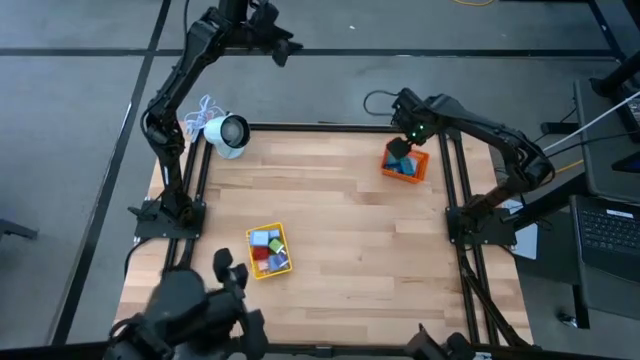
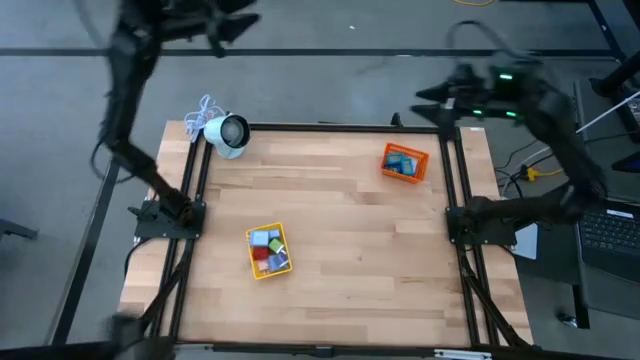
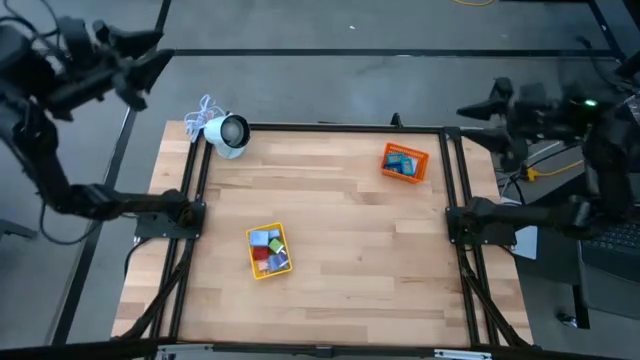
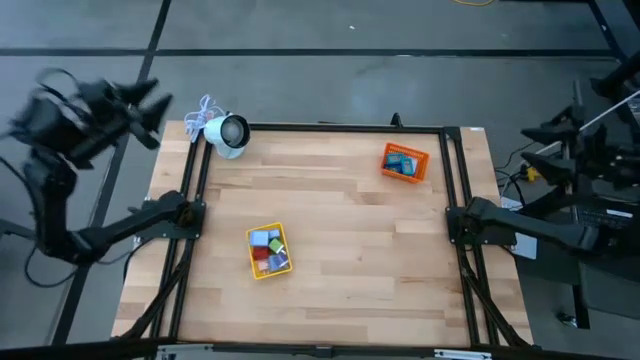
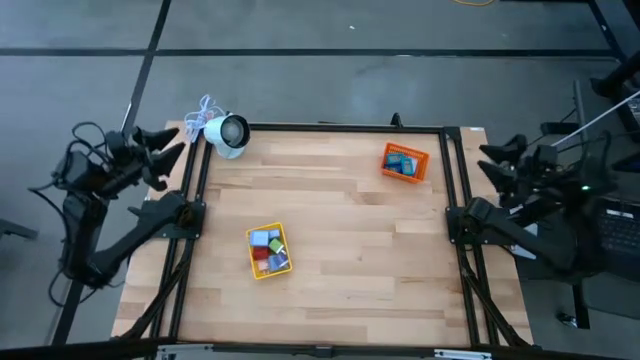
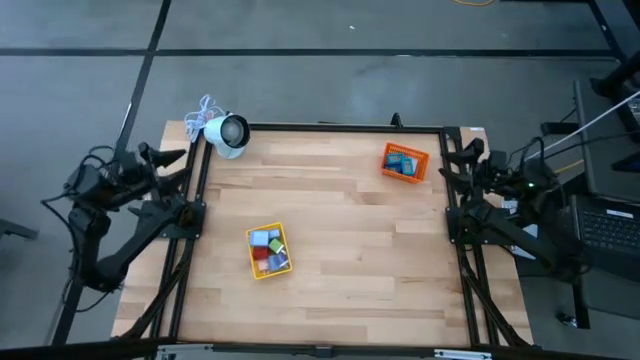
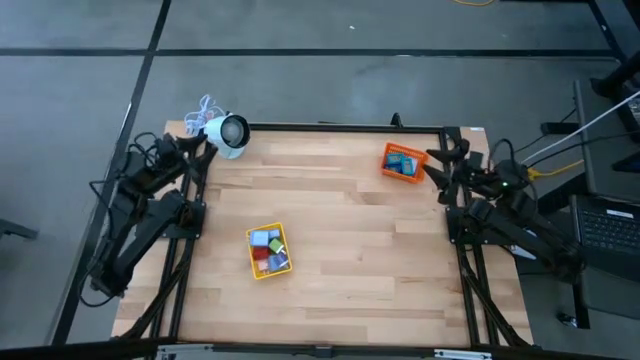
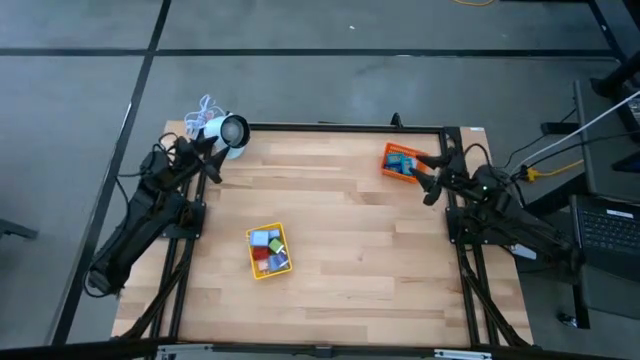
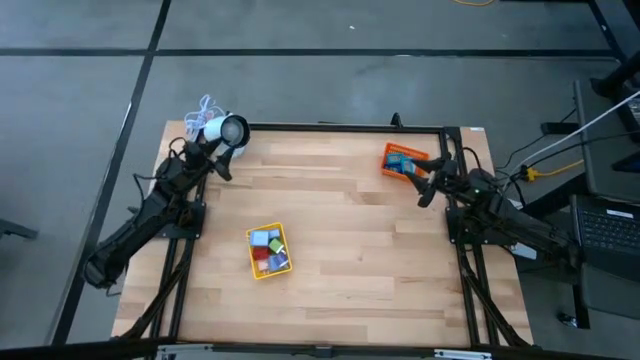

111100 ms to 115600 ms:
Task: Pick & Place Office items
Return to Home Position

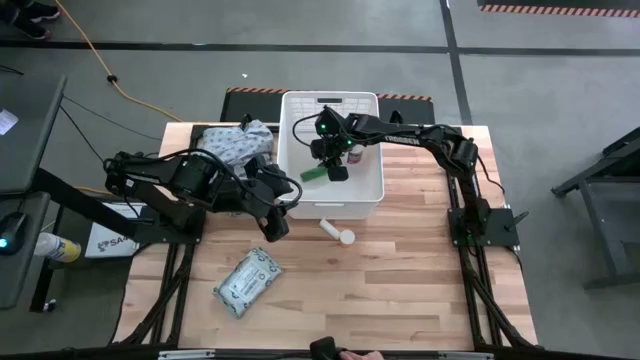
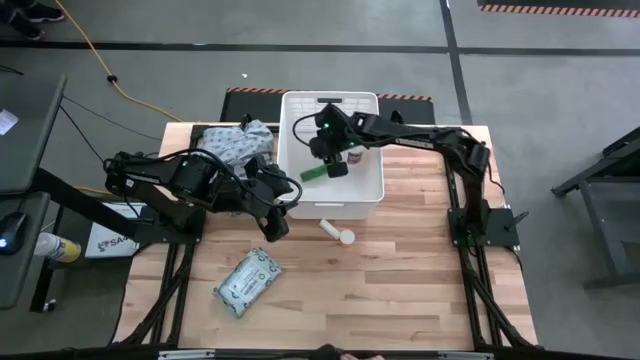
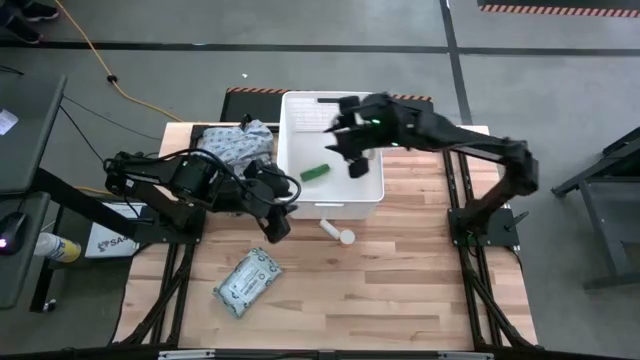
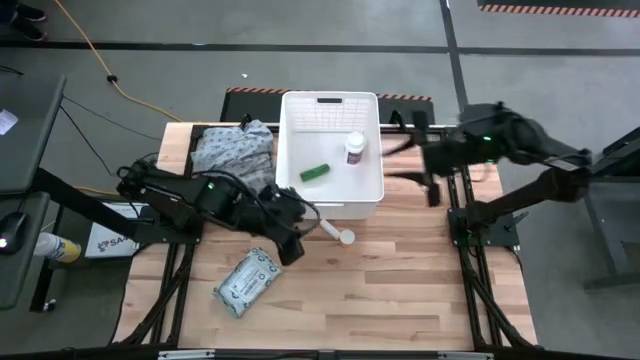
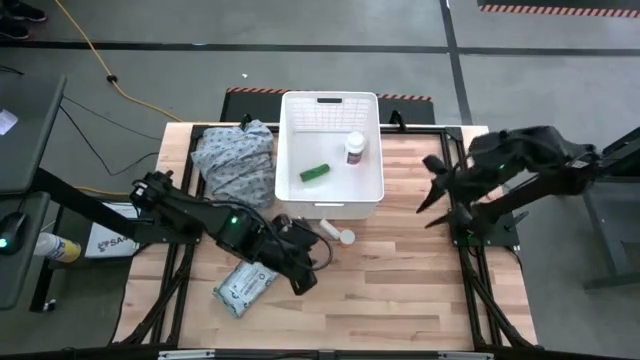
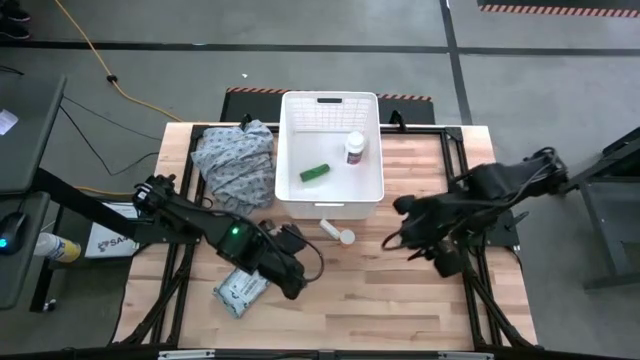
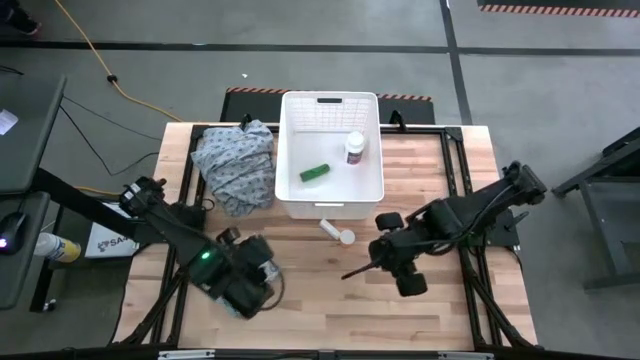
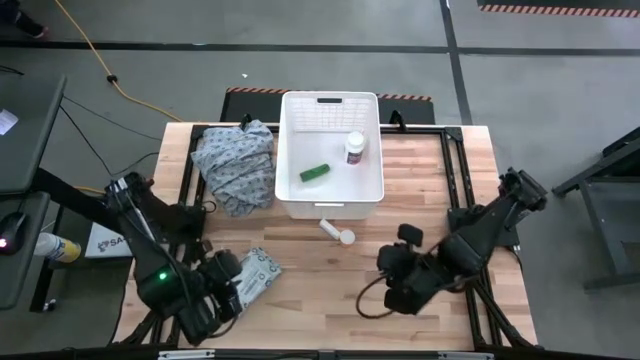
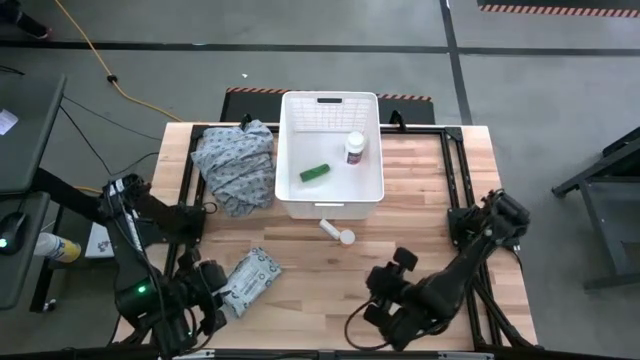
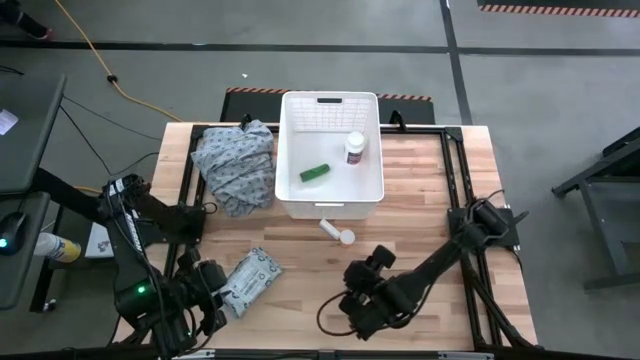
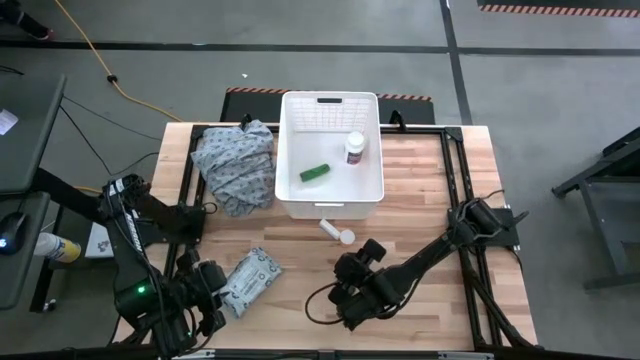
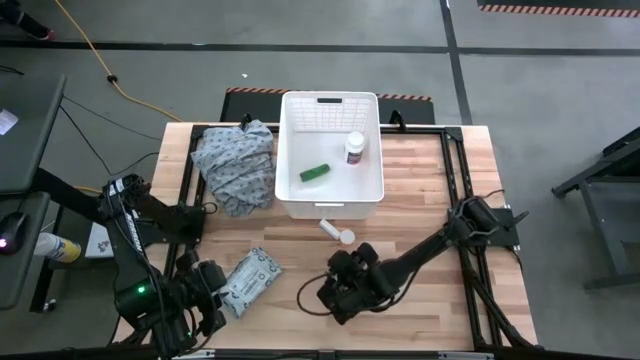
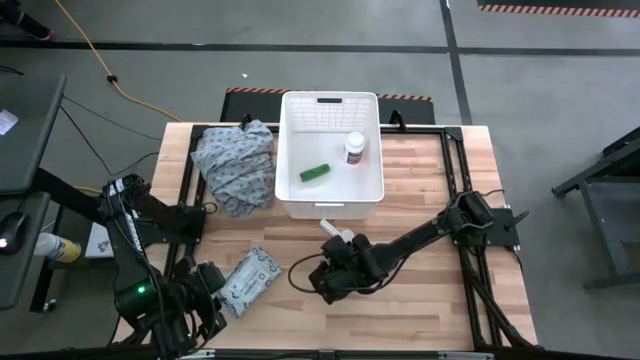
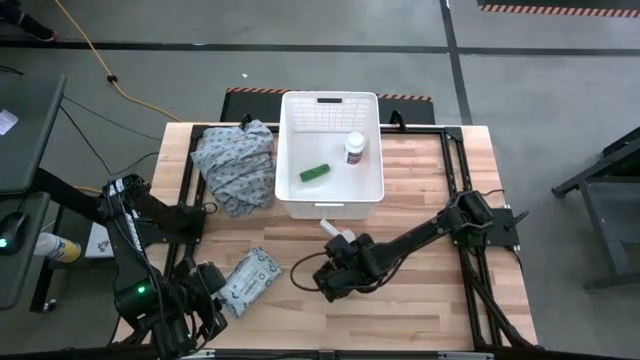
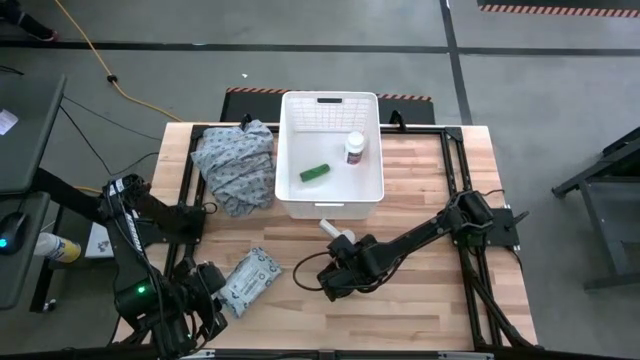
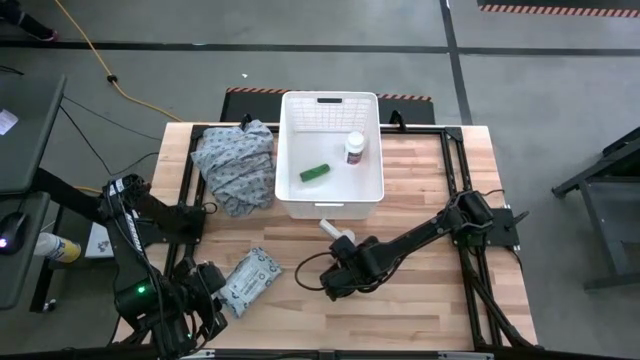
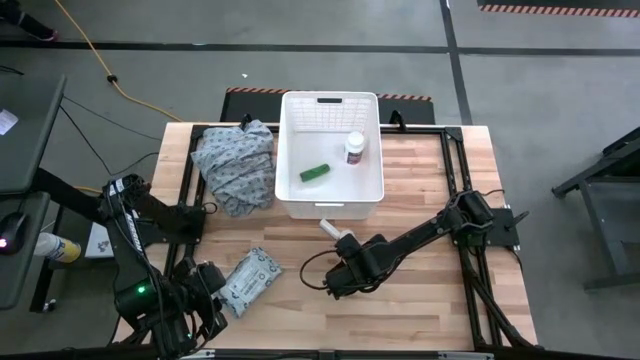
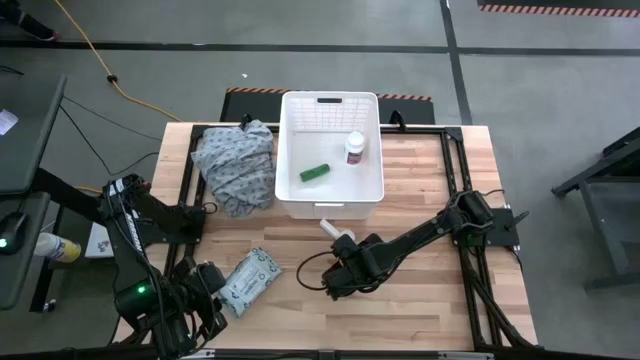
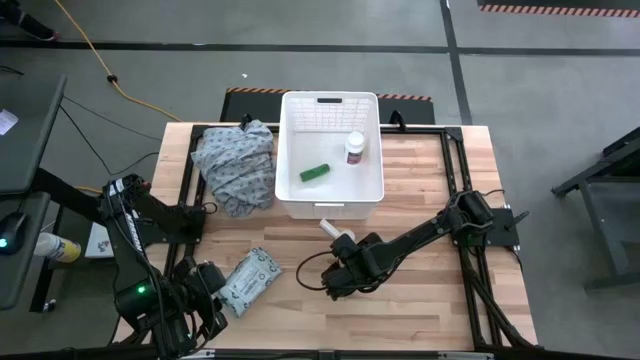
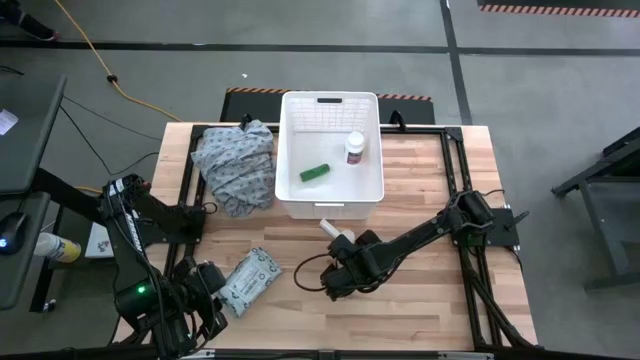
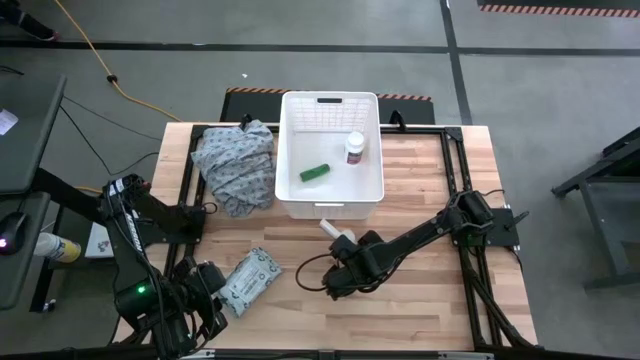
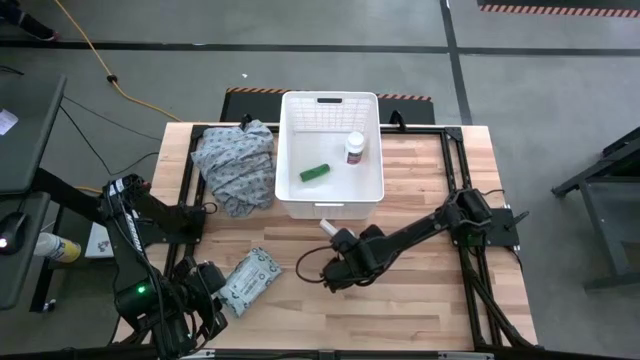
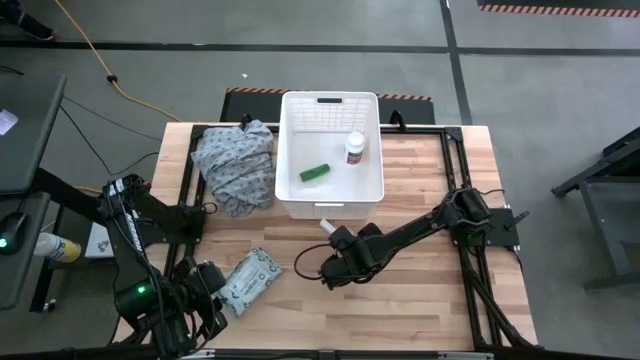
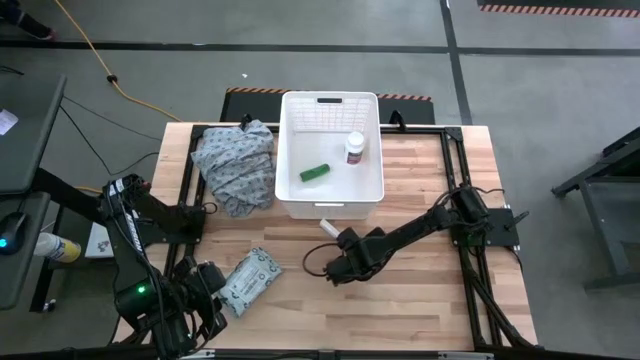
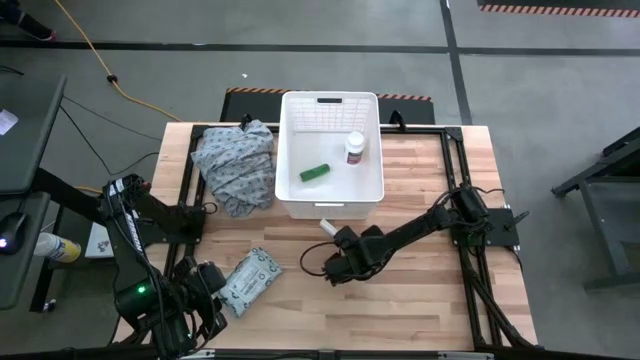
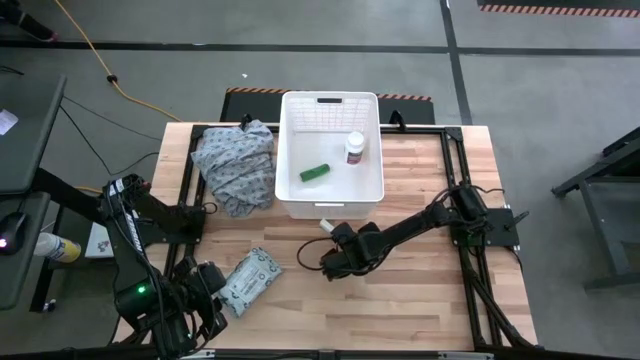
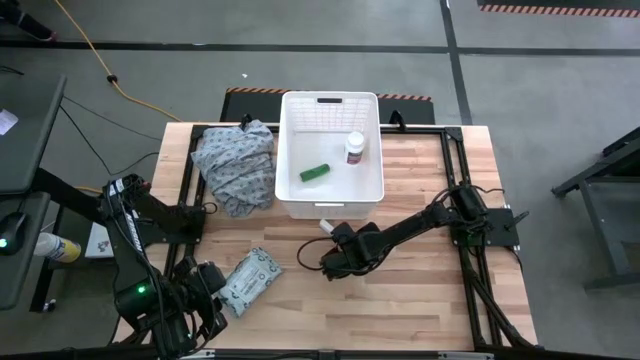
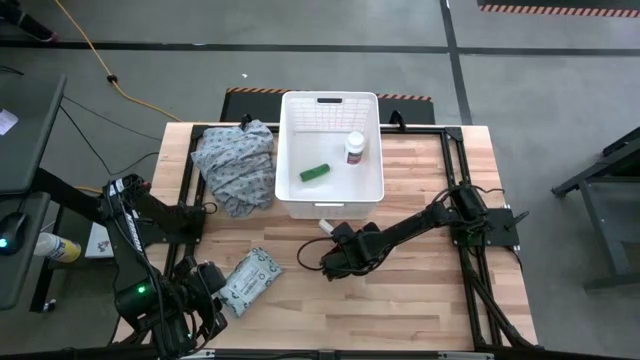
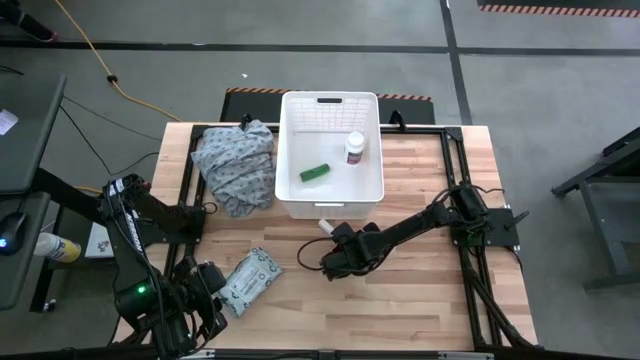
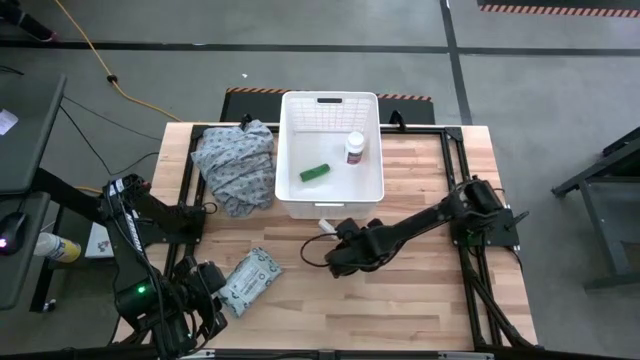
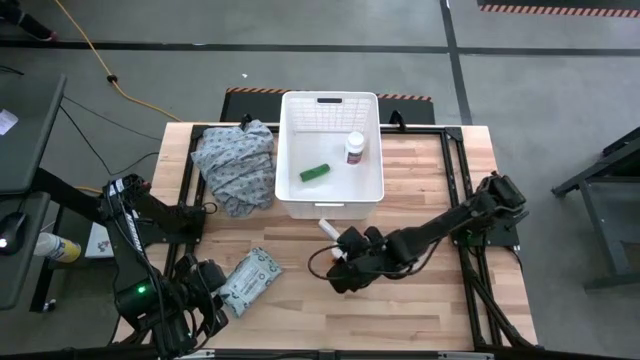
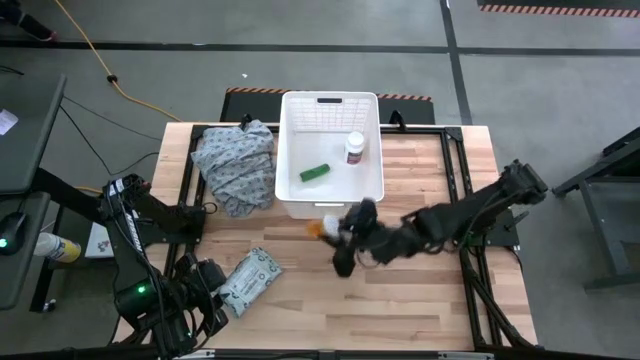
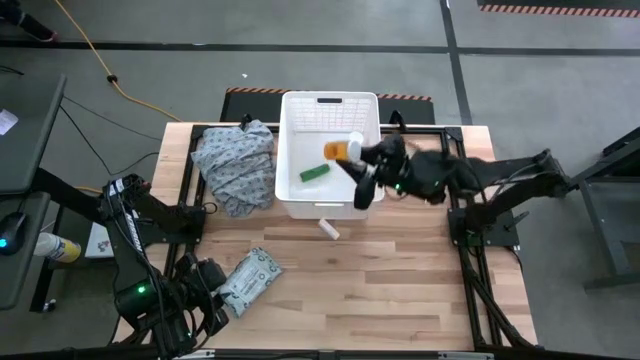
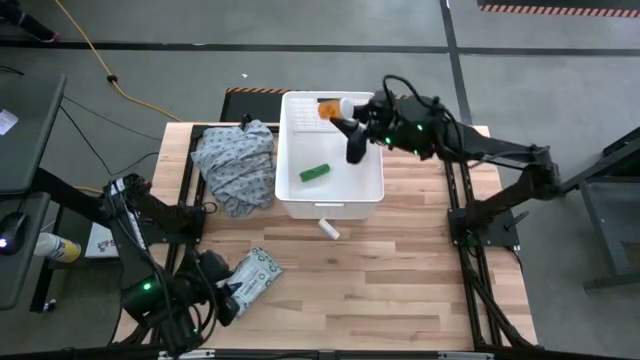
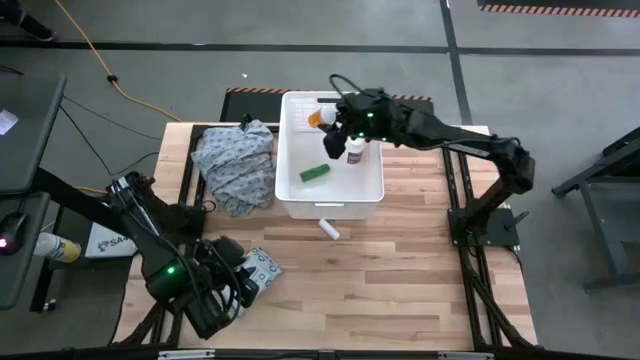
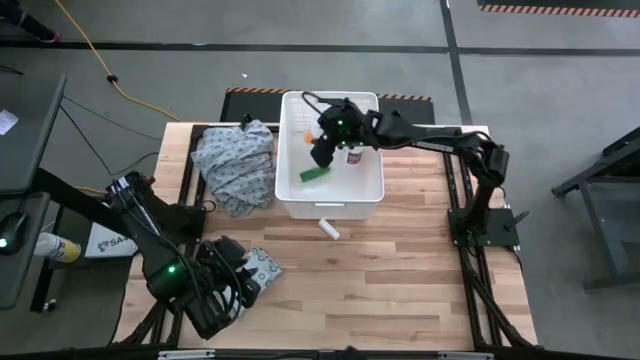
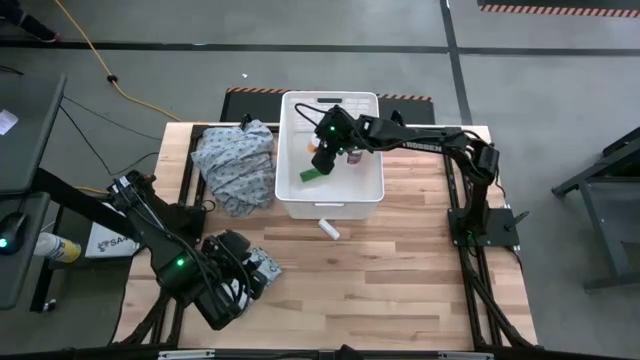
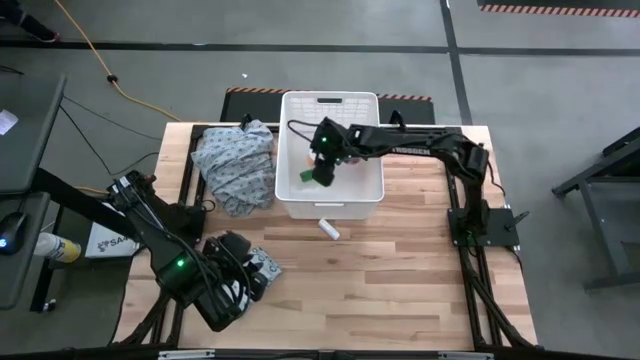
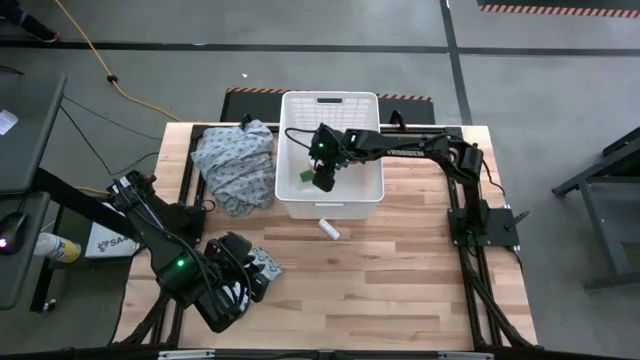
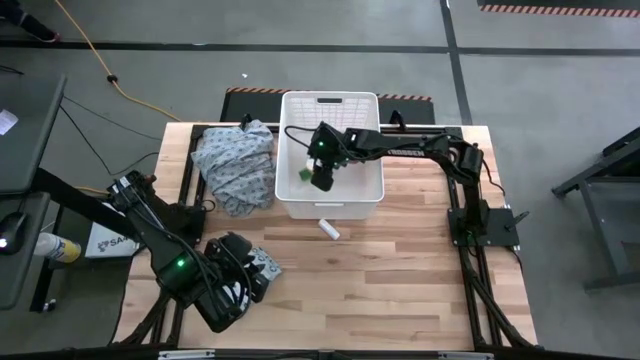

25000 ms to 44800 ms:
Task: Pick & place medical supplies in basket/bin
Put the orange pill bottle into the white bin
